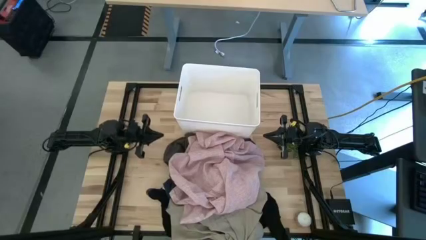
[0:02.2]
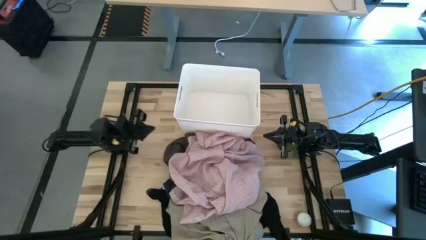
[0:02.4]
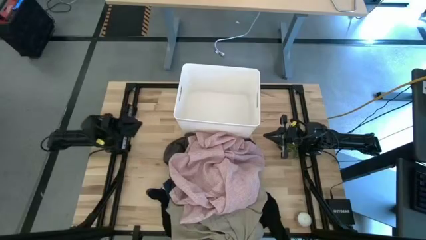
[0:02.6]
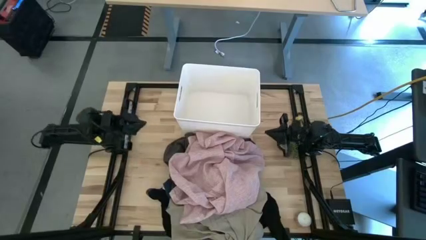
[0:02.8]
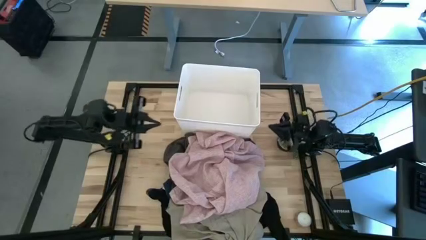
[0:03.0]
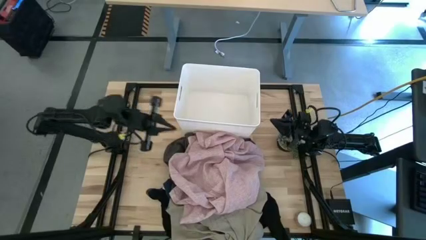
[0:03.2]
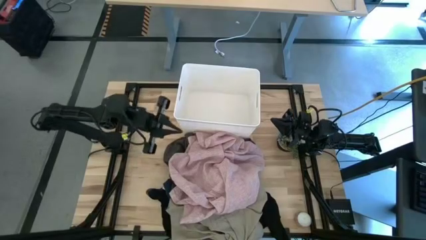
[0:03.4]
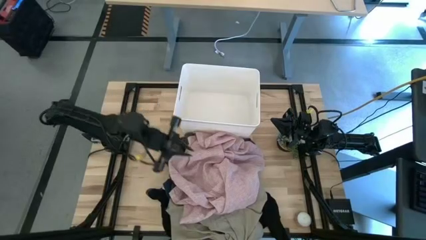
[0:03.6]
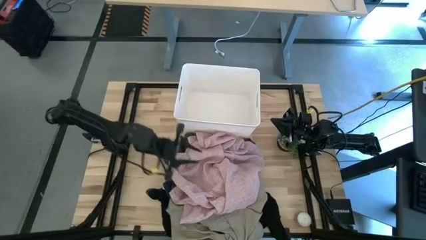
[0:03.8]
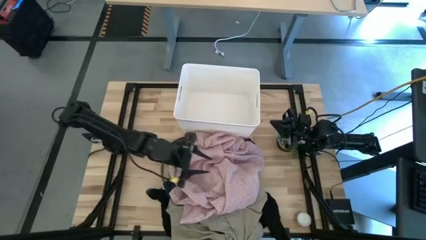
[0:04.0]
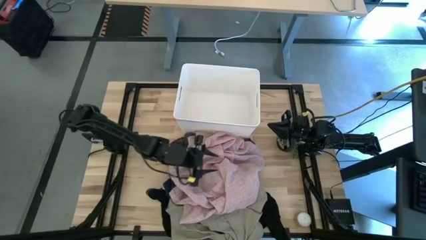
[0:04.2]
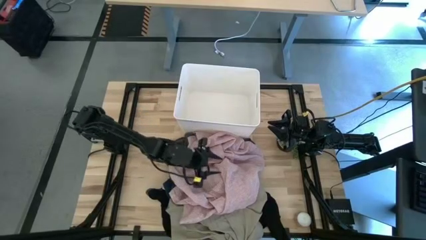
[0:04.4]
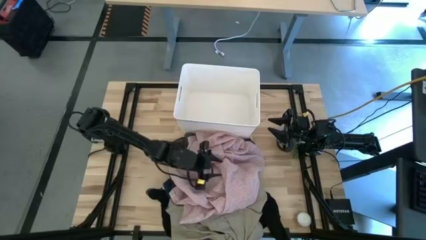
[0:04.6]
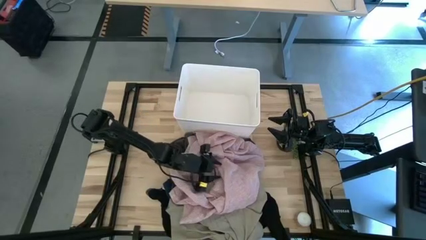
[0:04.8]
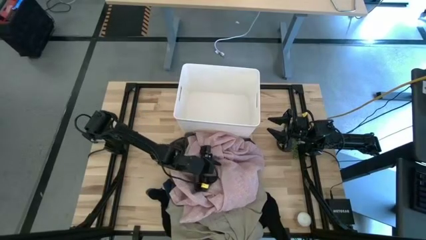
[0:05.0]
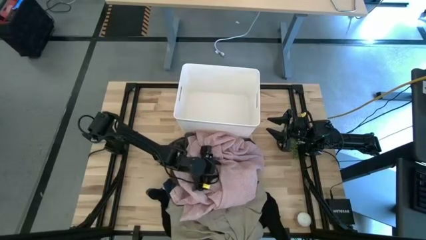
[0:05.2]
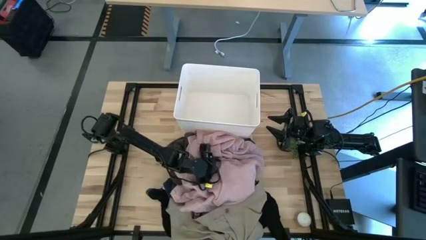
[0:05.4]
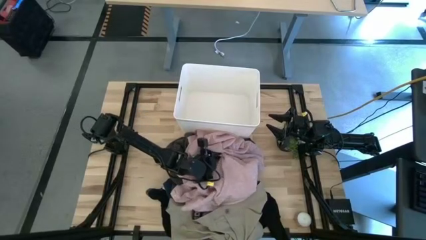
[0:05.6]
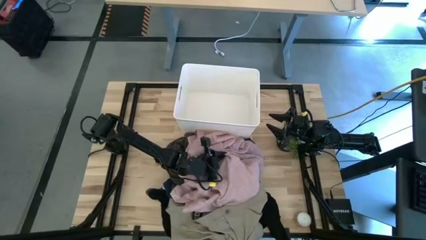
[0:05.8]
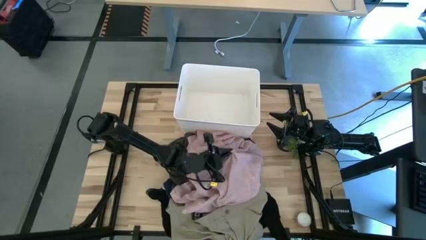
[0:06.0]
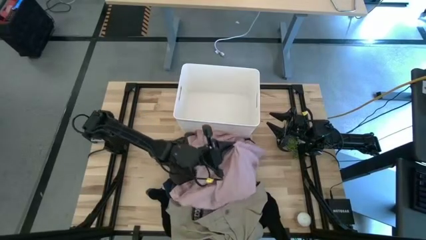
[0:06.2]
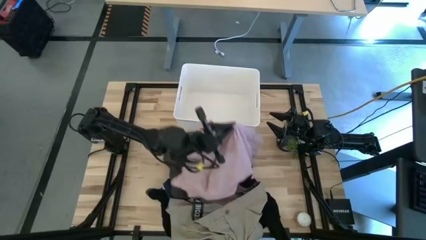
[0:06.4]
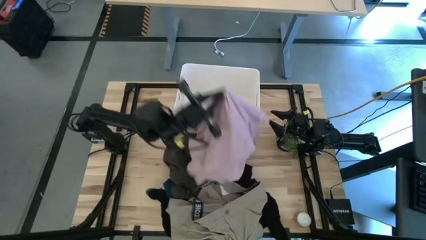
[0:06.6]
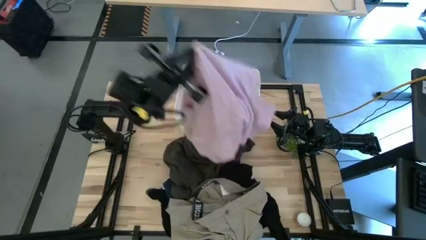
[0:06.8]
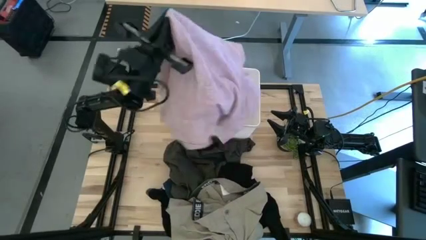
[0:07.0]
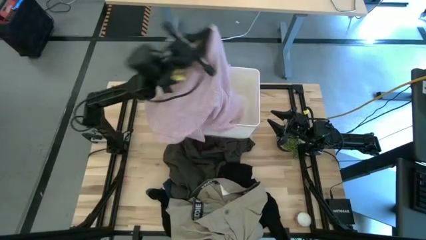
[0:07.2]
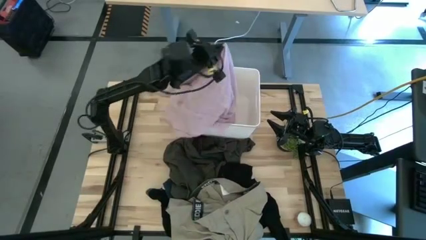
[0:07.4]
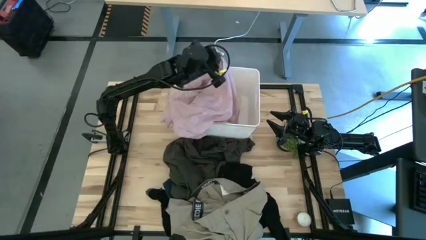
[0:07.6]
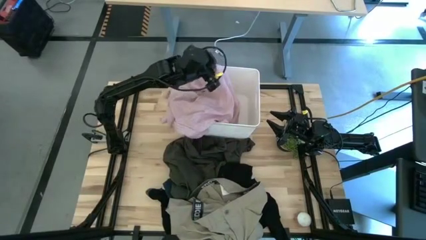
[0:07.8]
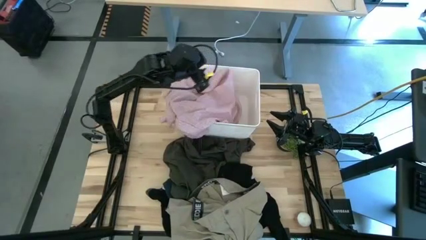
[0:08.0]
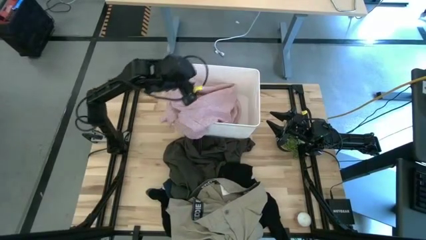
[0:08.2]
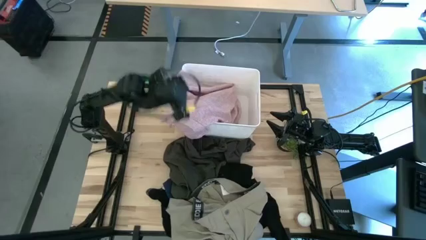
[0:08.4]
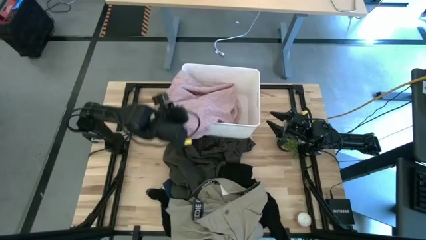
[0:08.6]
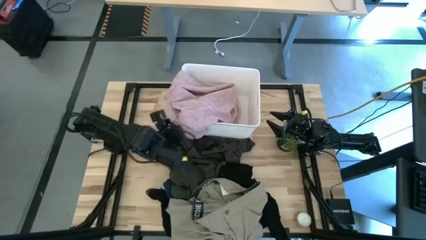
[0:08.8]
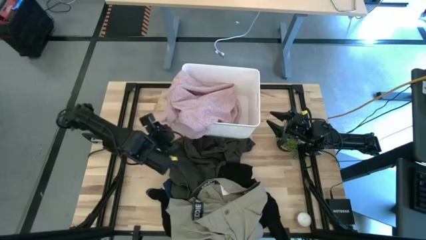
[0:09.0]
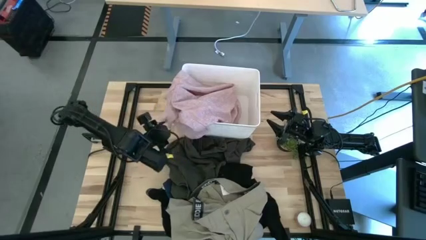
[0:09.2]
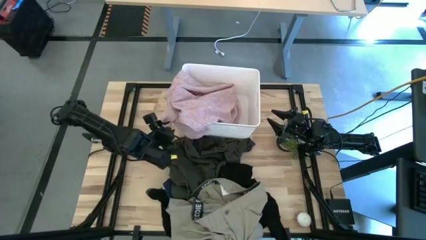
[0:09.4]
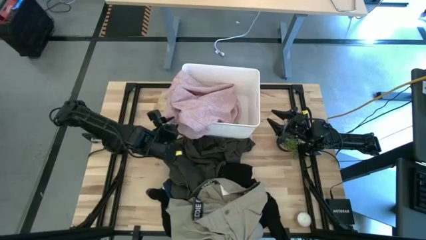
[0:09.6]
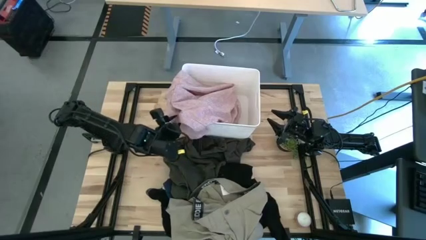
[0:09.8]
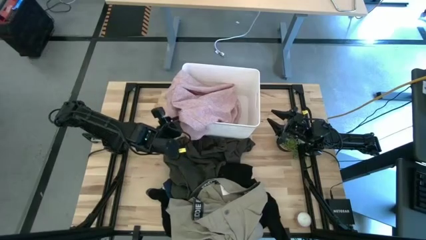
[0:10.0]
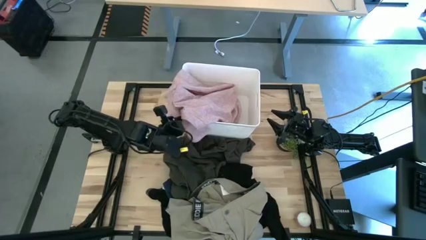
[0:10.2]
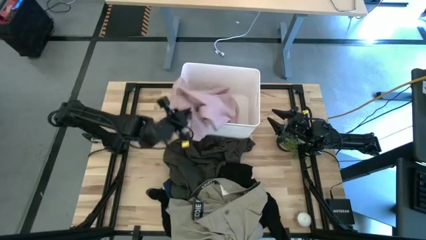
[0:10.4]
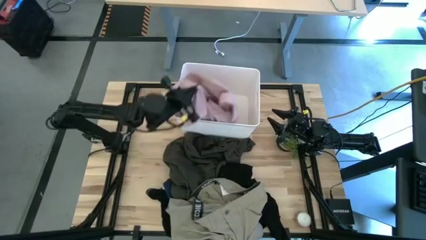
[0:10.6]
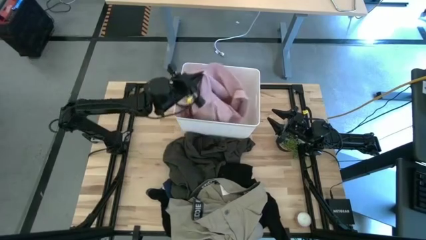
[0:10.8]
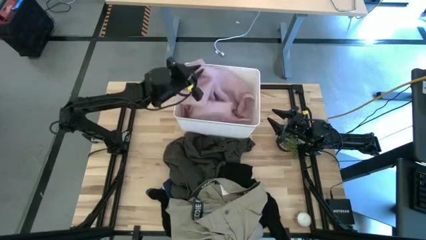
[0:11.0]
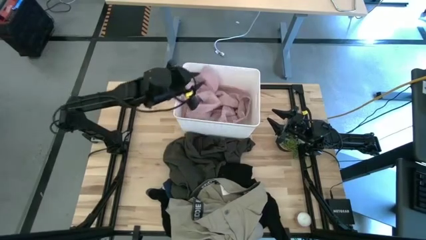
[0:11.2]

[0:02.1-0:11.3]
Task: Sort clothes
Put the pink shirt into the white laundry bin

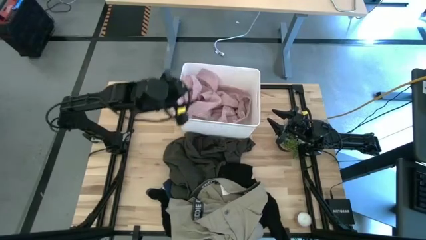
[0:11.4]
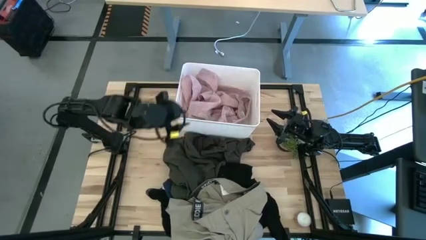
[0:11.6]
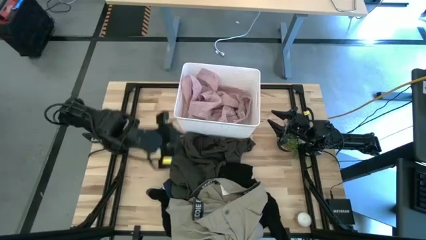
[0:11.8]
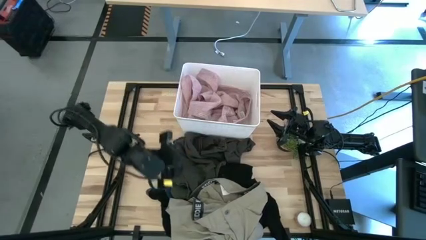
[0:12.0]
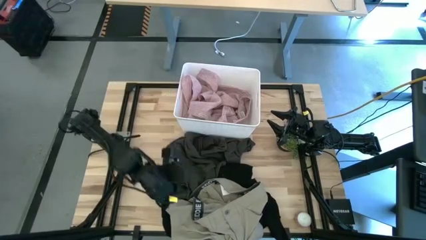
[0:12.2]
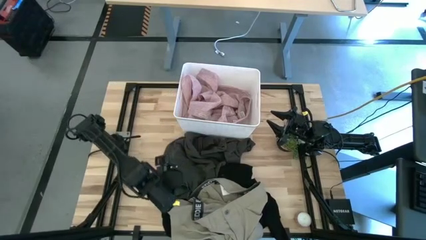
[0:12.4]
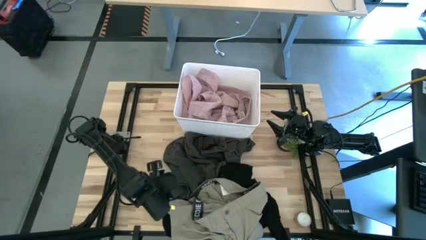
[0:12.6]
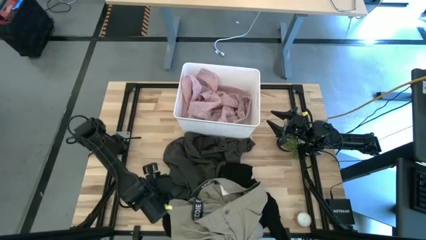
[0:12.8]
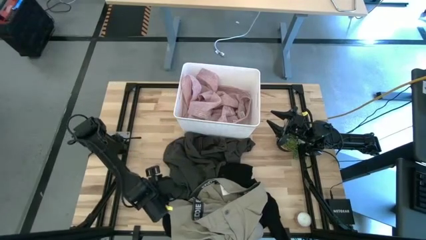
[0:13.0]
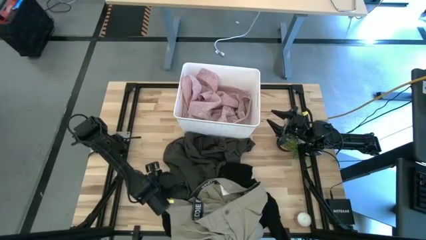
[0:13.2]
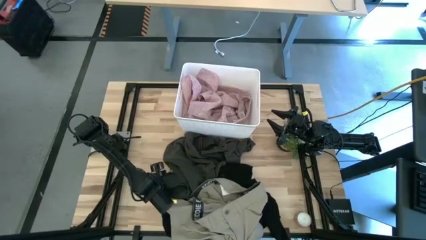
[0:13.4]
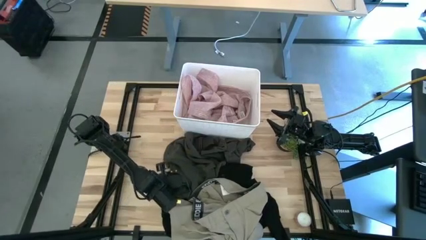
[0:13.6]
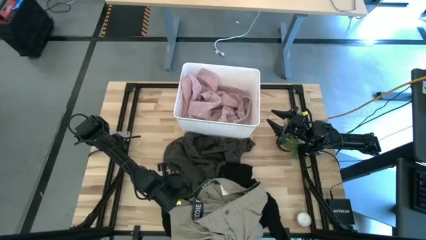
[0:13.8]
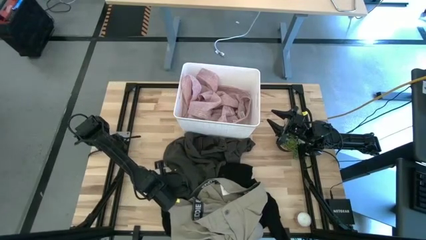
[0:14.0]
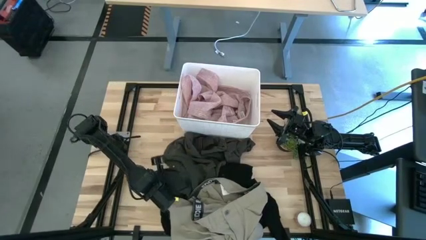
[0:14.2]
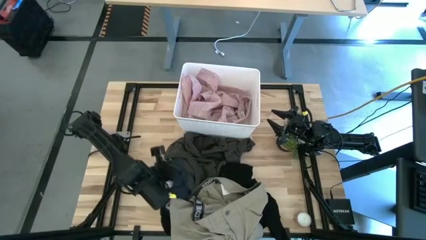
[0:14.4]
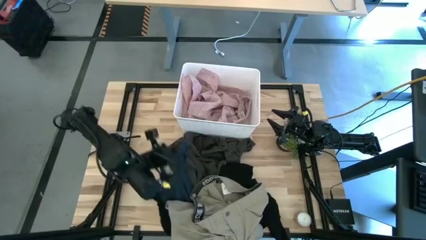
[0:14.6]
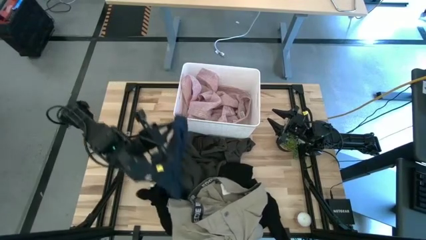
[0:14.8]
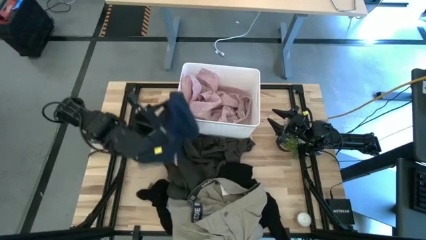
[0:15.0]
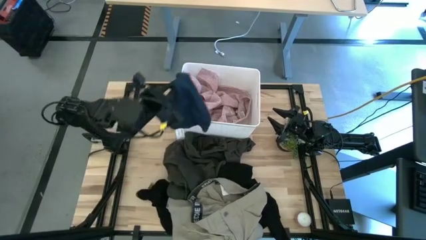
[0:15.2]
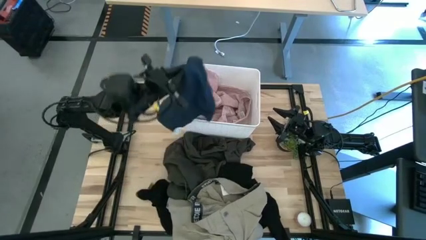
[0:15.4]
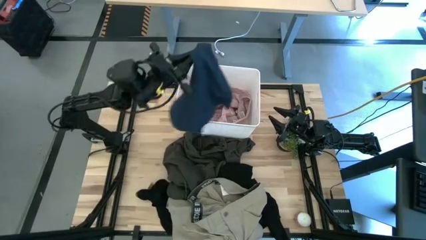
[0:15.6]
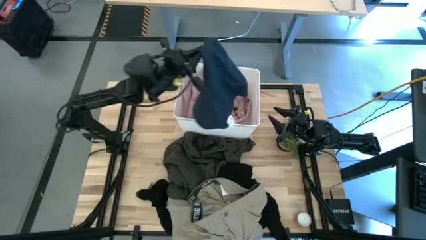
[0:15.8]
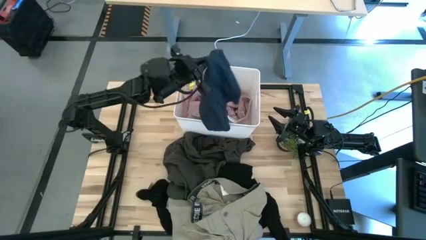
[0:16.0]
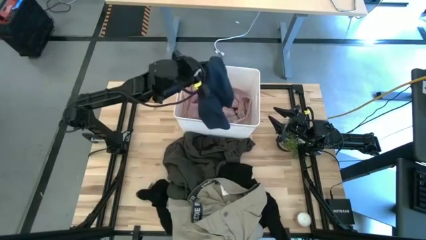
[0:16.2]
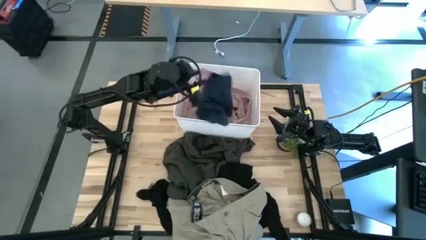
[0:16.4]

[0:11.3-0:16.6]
Put the blue underwear into the white laundry bin

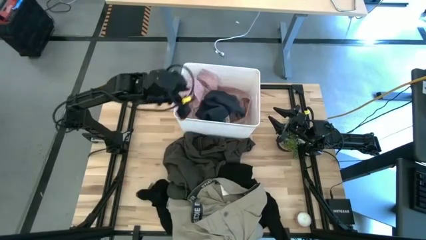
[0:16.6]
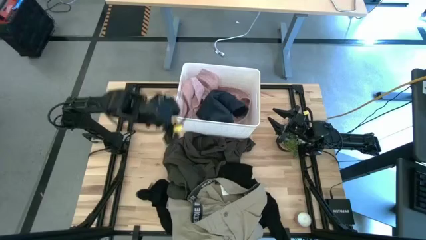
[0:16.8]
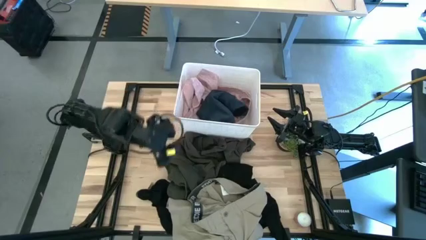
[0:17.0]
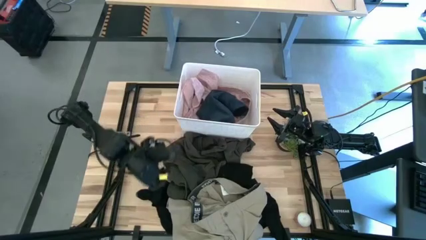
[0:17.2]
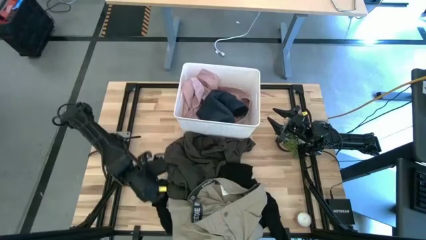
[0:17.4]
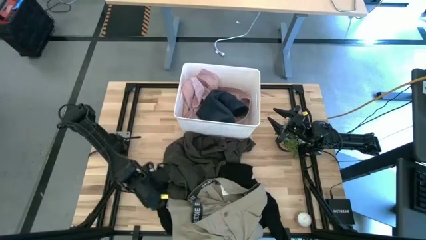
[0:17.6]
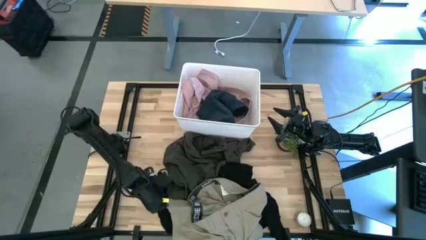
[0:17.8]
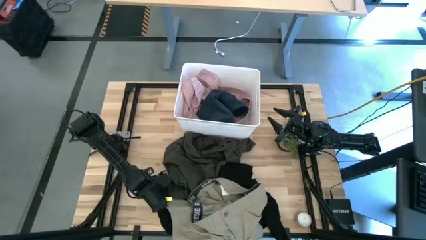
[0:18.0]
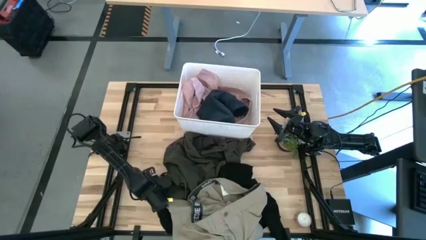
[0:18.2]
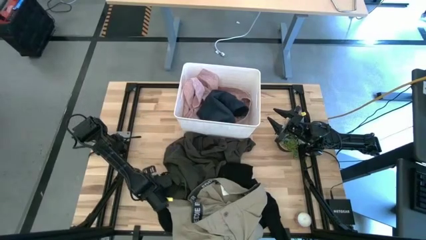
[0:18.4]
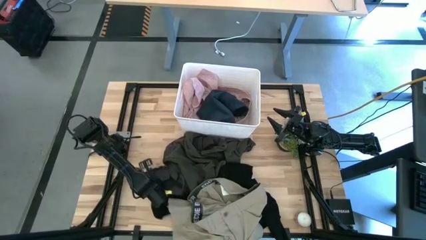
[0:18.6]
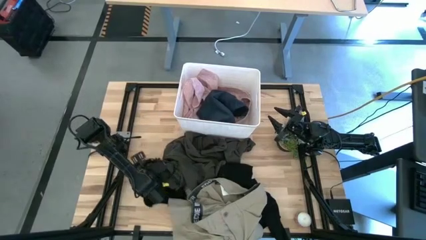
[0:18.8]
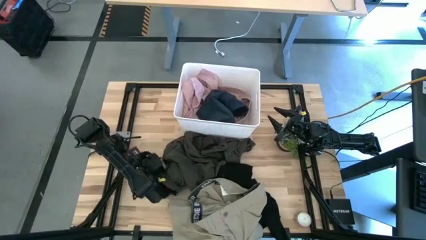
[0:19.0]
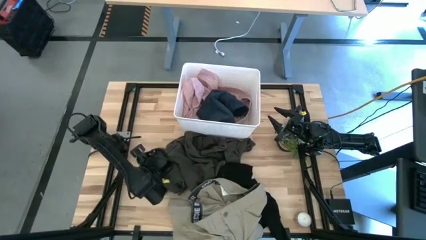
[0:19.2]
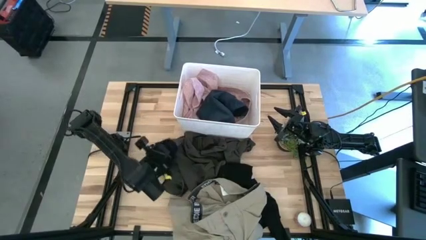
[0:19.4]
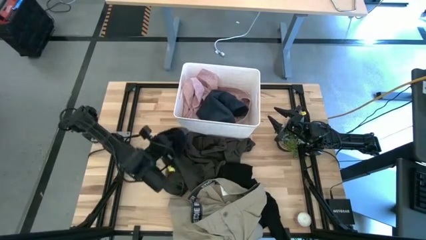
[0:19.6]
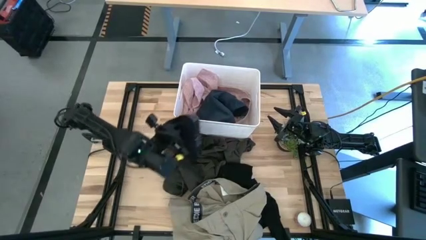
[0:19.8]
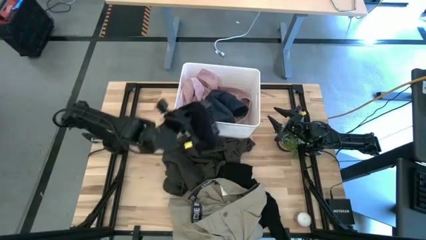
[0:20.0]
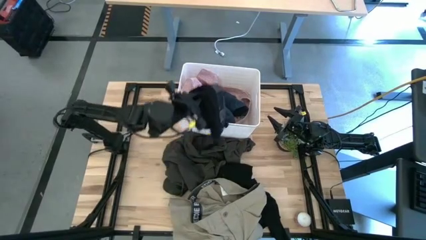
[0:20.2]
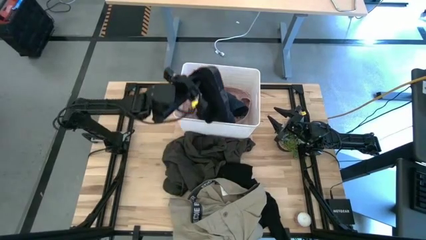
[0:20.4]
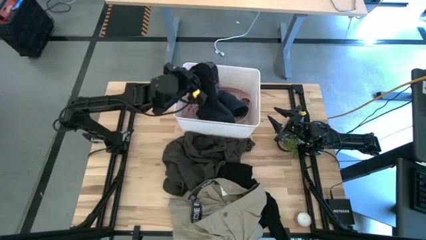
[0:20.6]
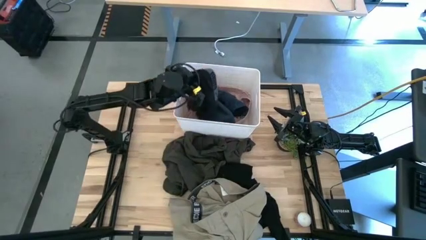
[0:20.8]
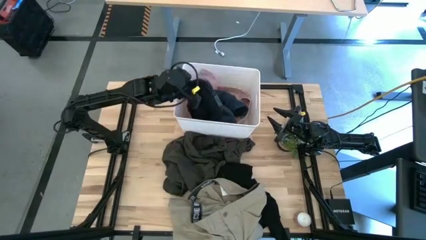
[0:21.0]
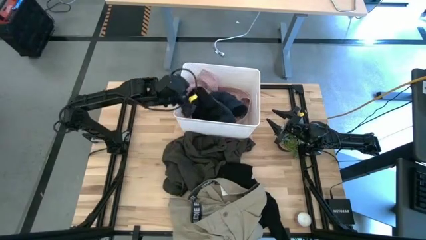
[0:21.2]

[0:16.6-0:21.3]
Put the black underwear into the white laundry bin
